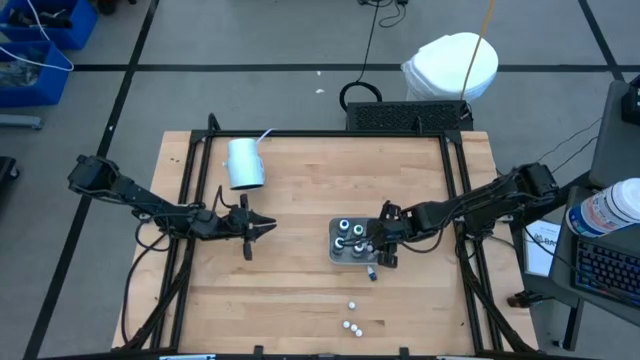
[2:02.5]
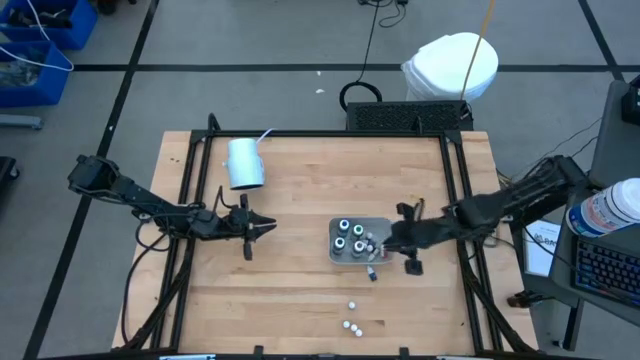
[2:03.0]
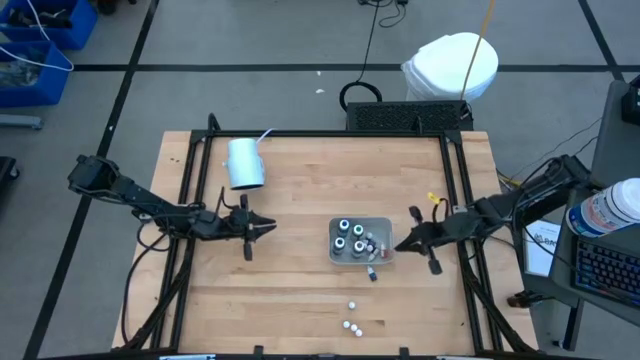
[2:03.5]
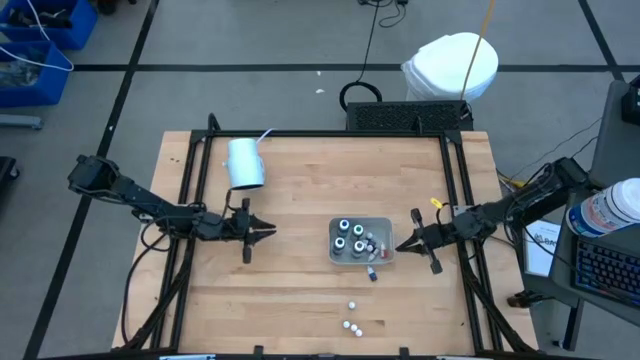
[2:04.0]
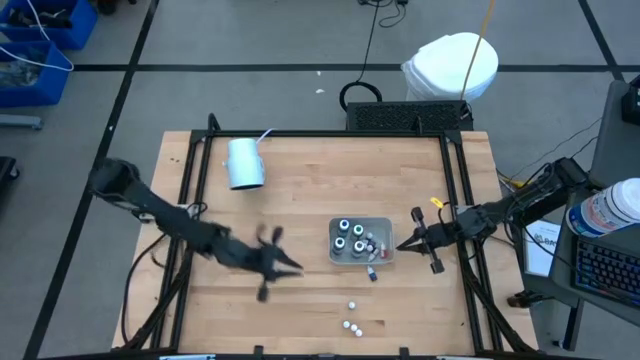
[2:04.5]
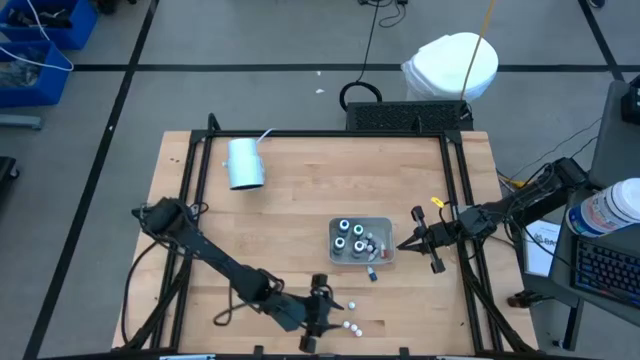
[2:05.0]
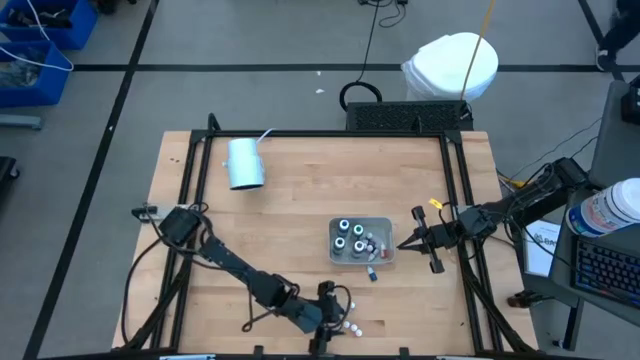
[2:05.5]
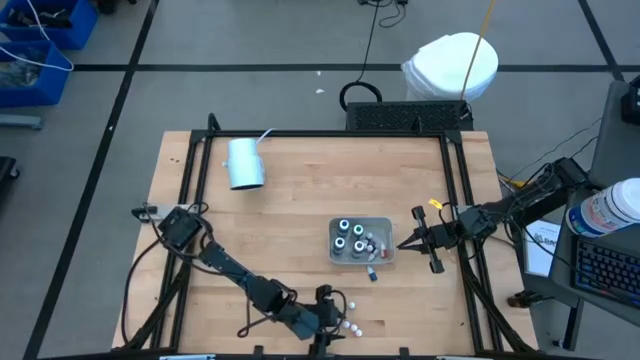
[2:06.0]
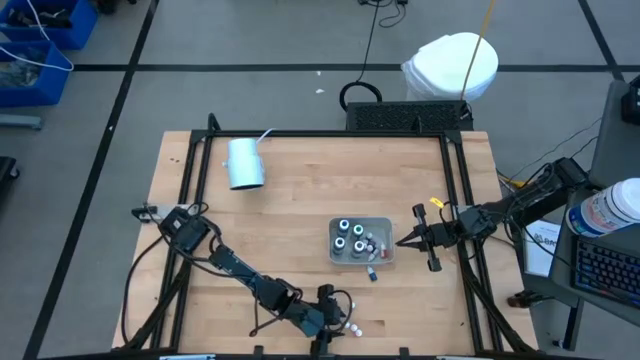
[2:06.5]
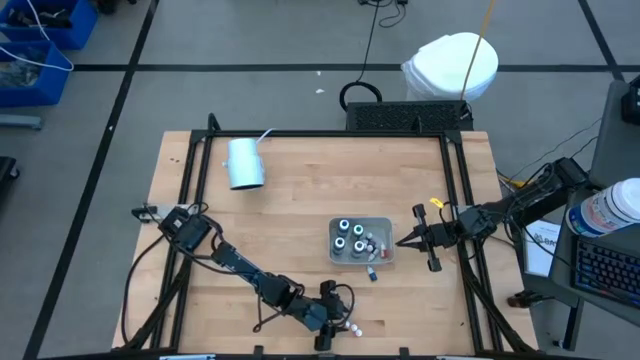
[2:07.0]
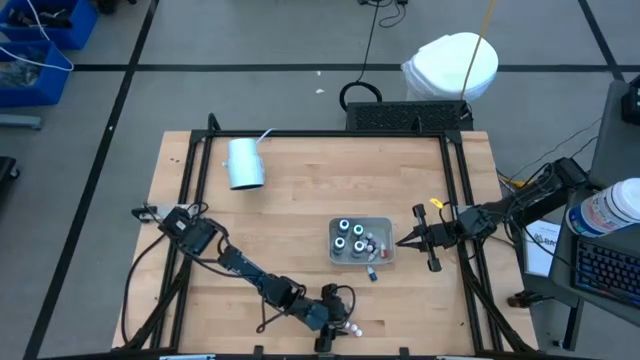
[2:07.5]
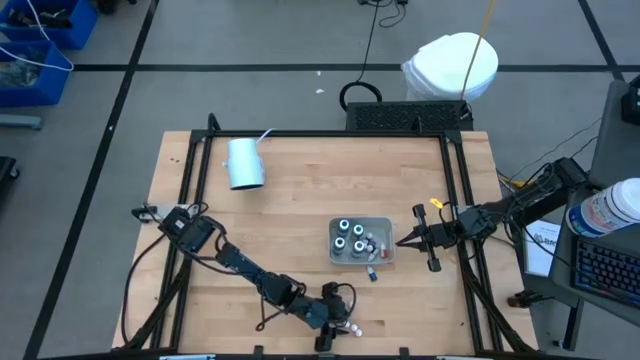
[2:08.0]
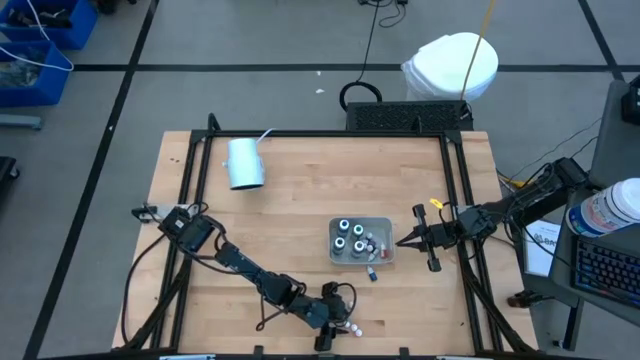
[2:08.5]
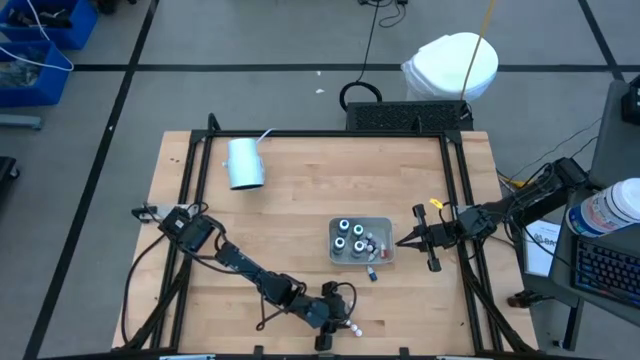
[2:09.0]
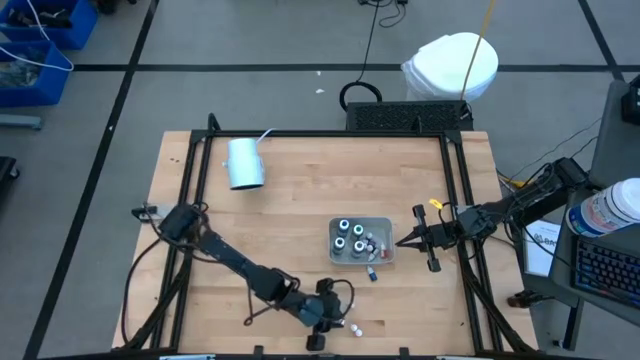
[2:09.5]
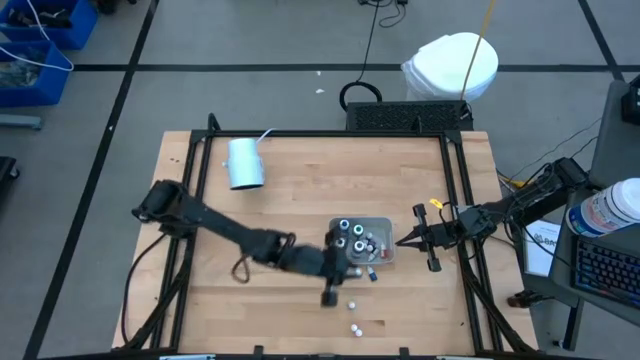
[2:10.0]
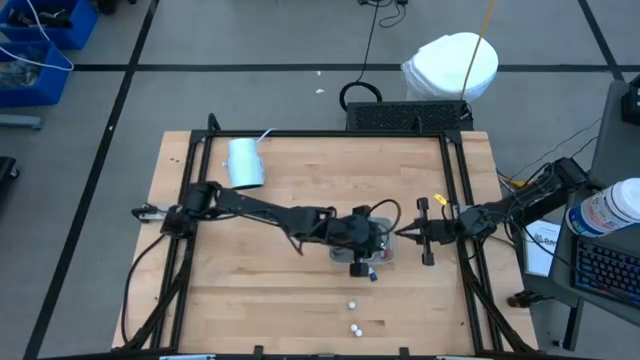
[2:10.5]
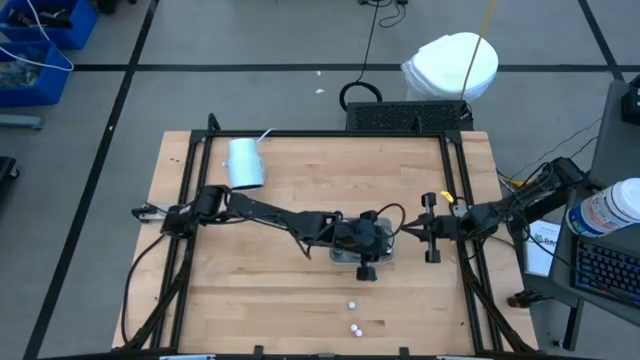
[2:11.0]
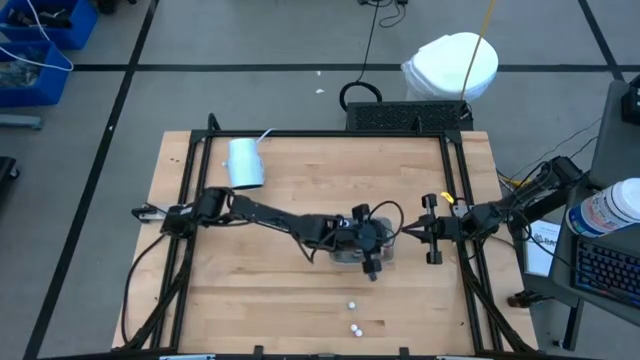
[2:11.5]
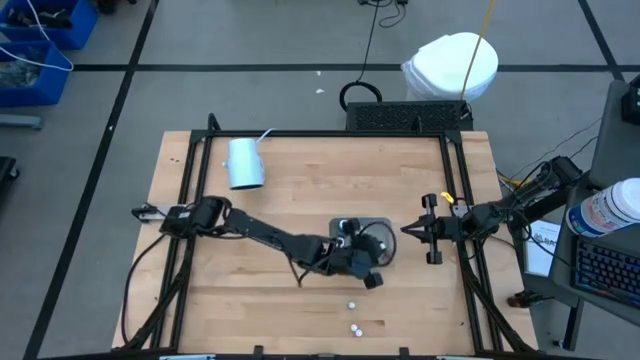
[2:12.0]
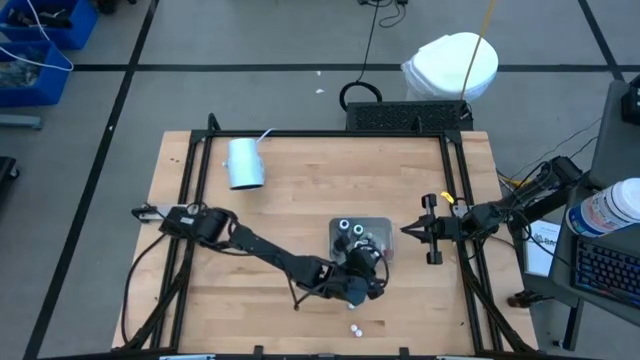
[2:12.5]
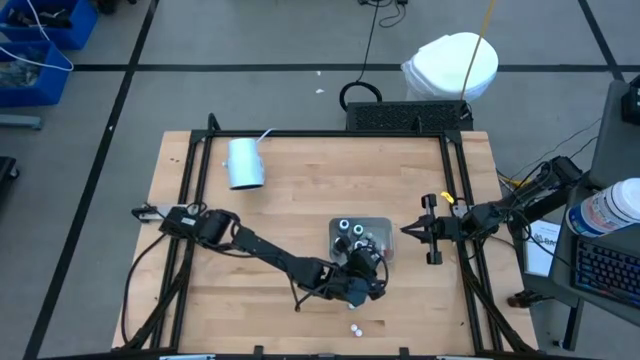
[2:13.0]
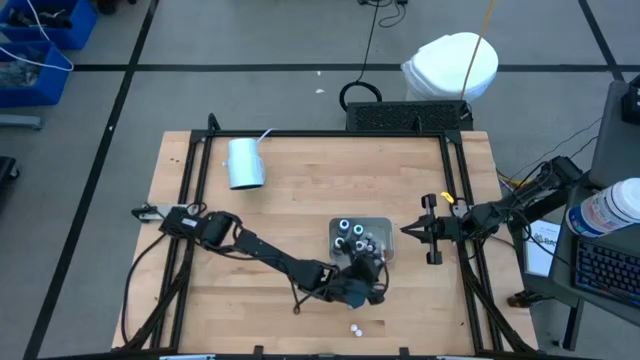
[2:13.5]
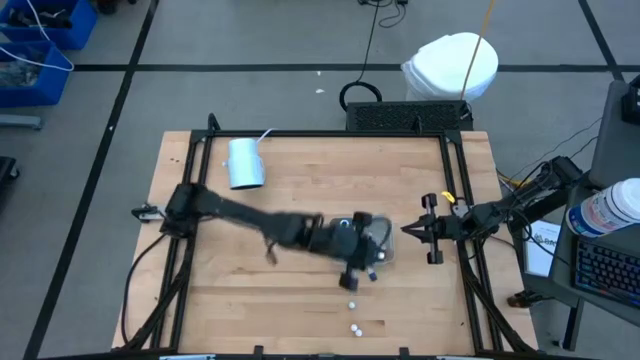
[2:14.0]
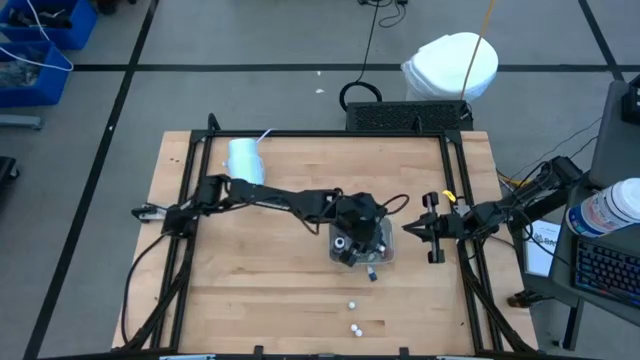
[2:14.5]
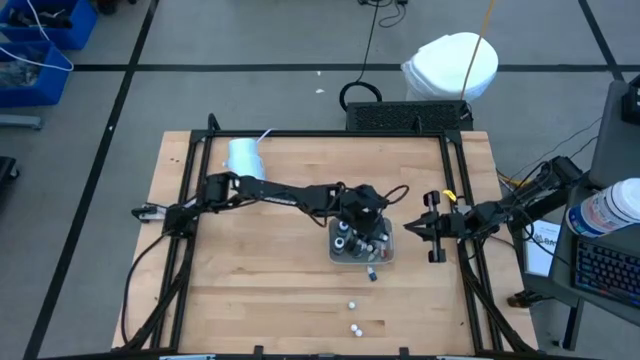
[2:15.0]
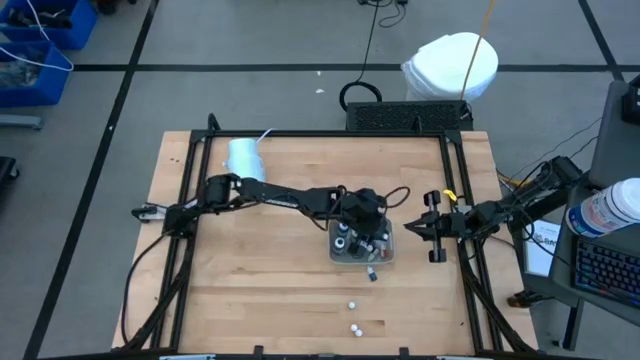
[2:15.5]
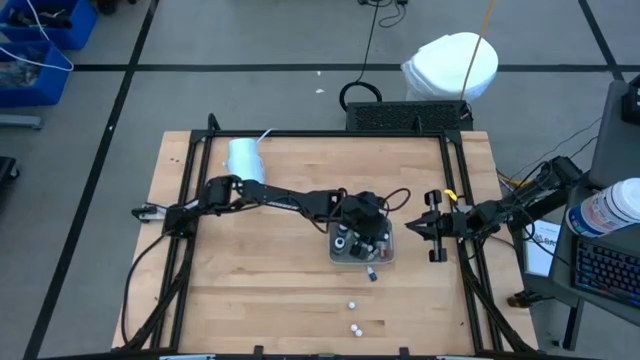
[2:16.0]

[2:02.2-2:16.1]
Task: Pick & Place food coloring
Put the red food coloring bottle into the gray bin

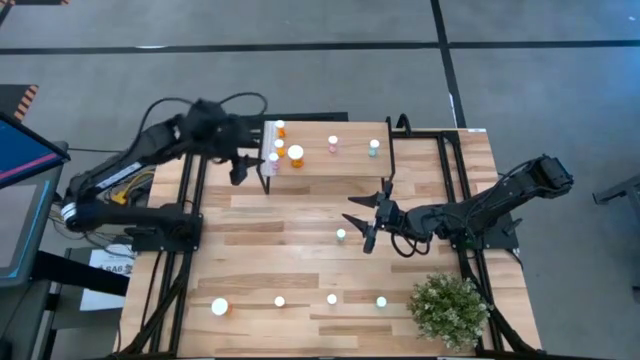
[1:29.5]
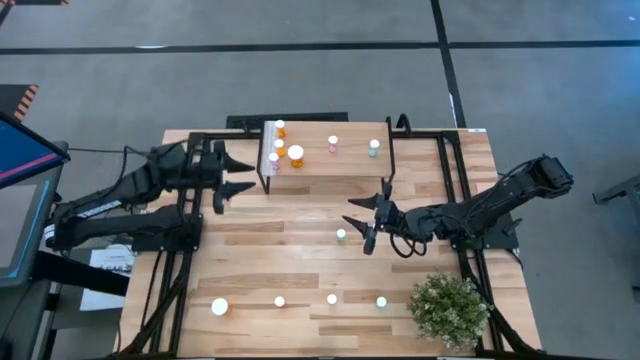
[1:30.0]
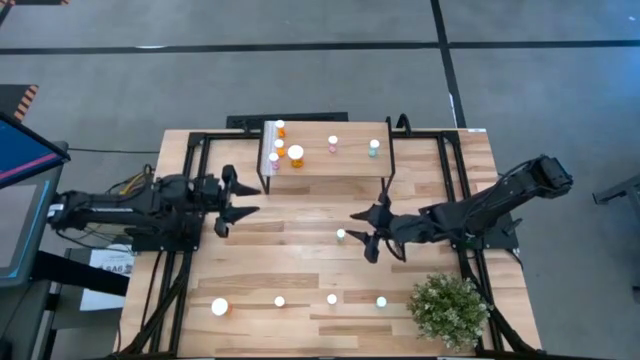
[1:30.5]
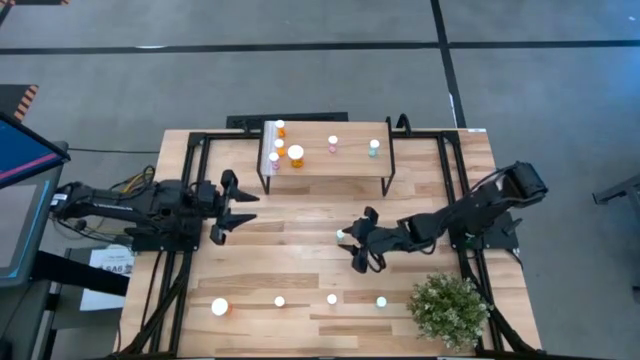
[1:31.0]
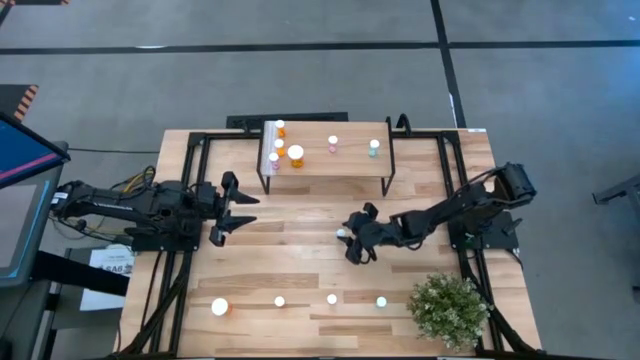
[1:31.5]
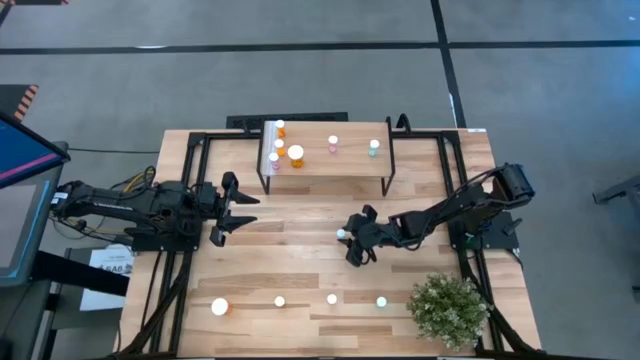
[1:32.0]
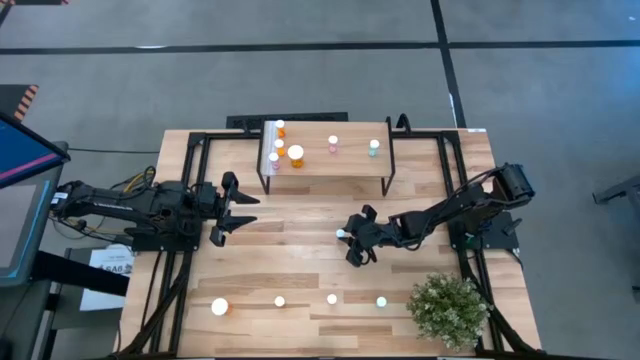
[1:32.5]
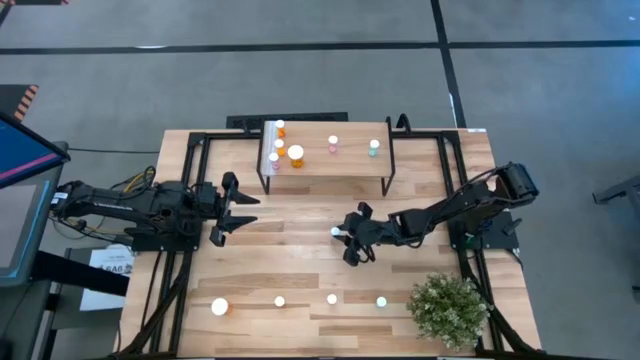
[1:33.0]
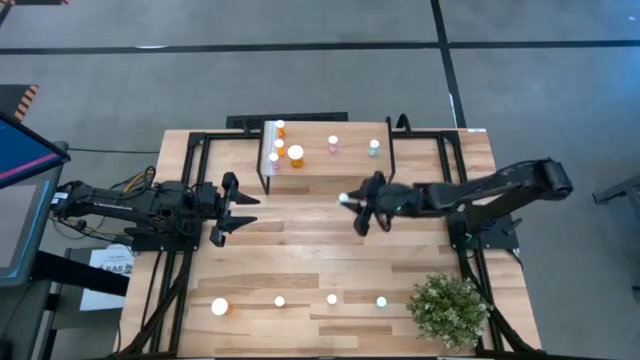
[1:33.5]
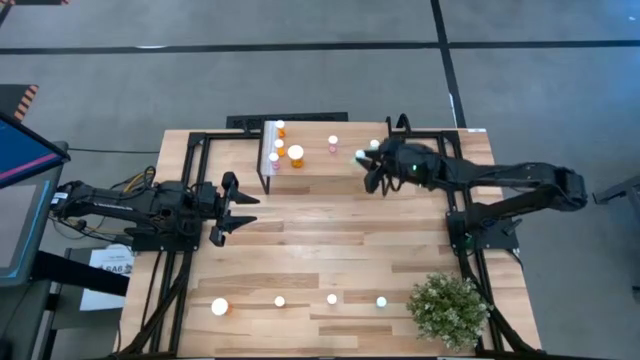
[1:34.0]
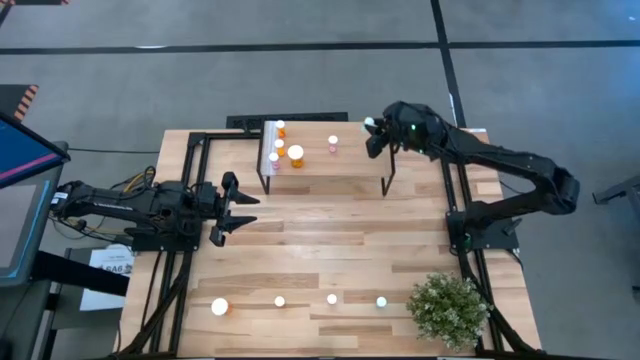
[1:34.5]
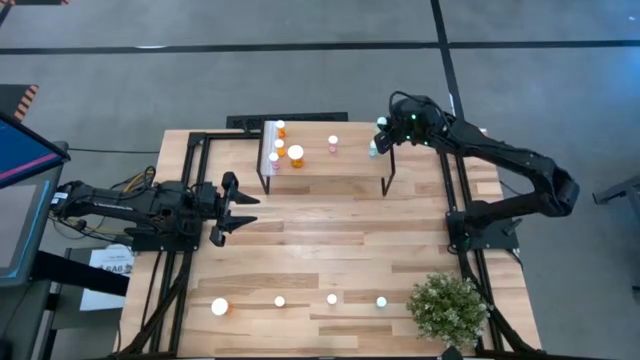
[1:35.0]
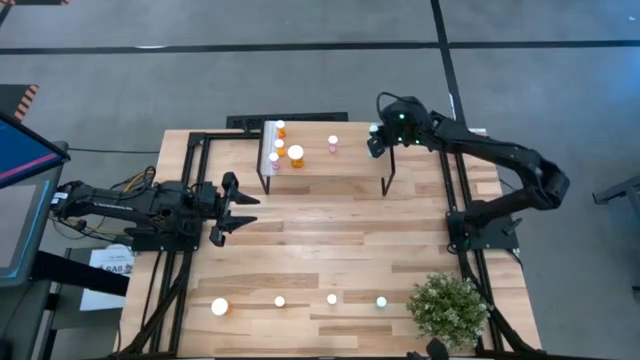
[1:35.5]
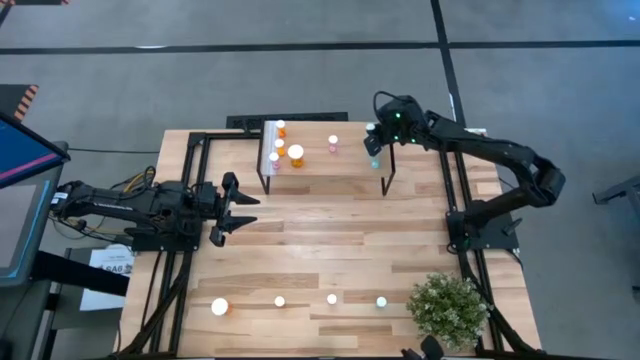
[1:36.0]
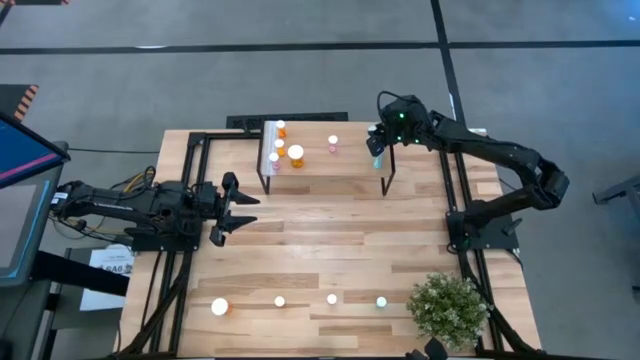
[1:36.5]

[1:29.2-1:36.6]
Task: Pick and place medicine bottles onto shelf by color
Put the top blue pill bottle on the shelf
